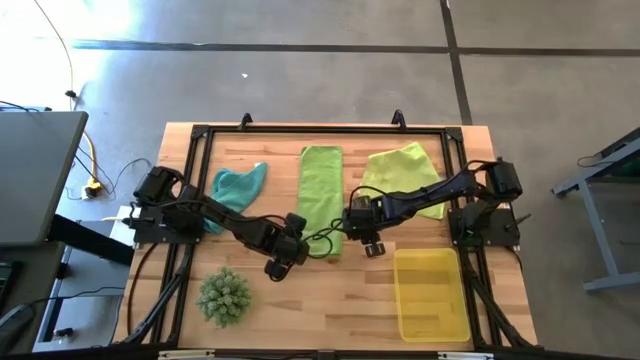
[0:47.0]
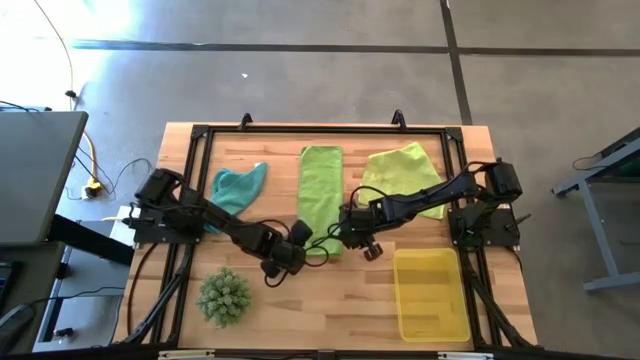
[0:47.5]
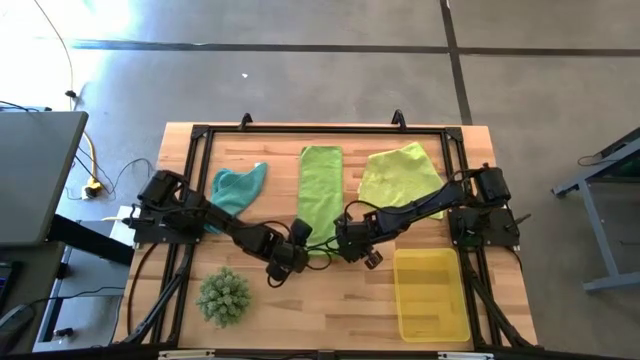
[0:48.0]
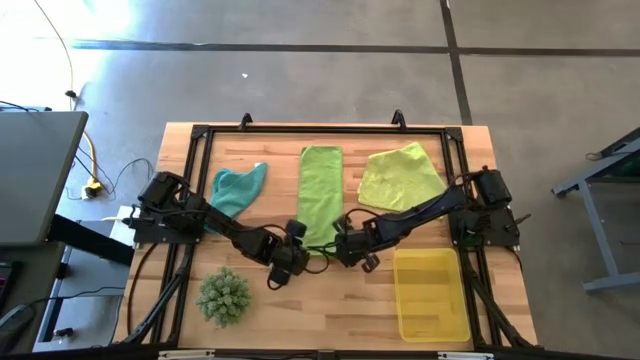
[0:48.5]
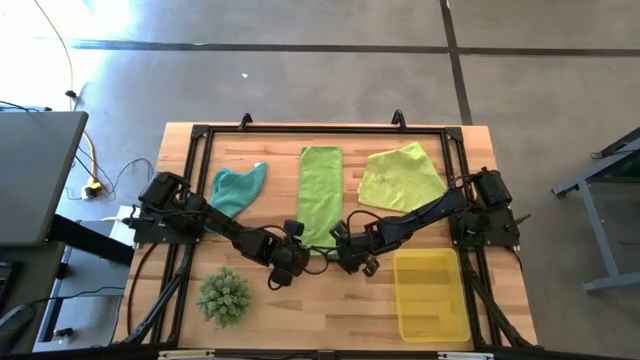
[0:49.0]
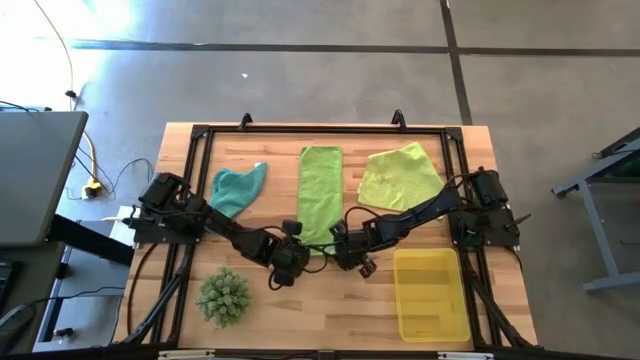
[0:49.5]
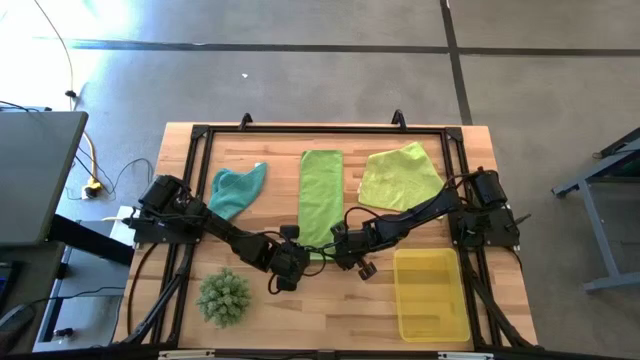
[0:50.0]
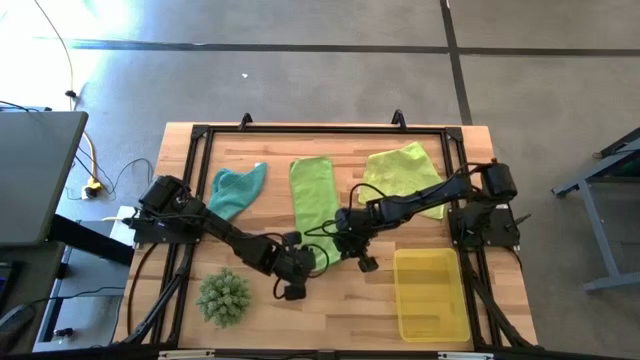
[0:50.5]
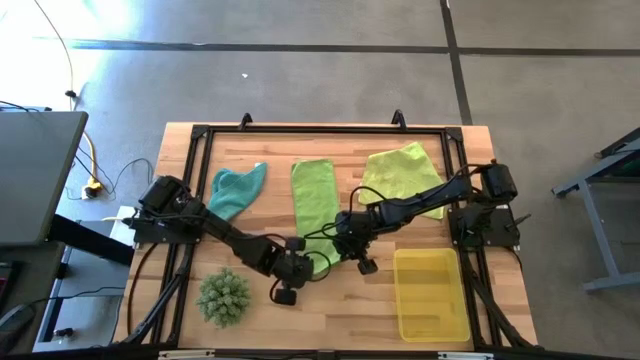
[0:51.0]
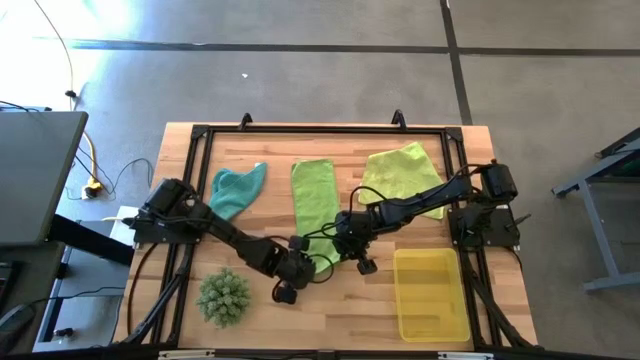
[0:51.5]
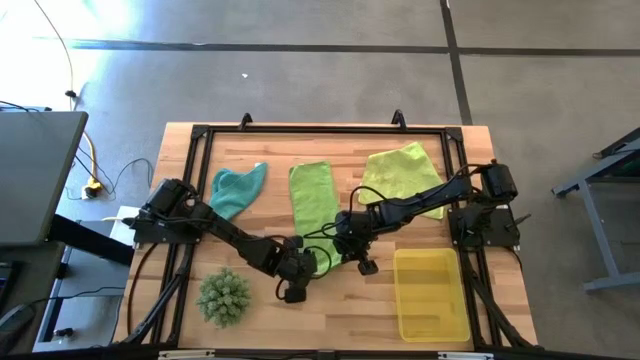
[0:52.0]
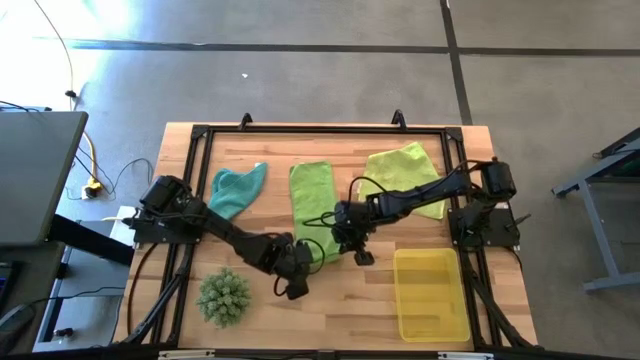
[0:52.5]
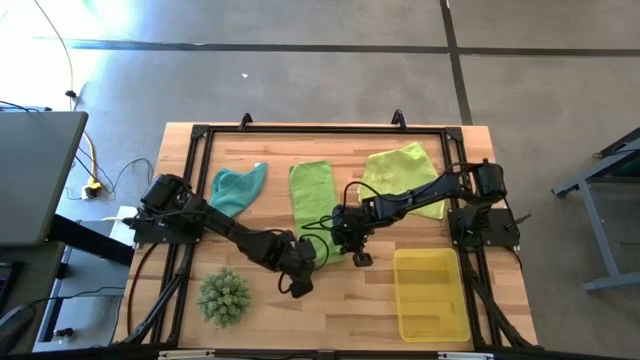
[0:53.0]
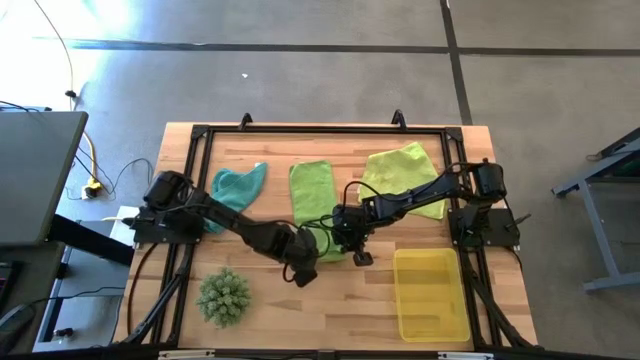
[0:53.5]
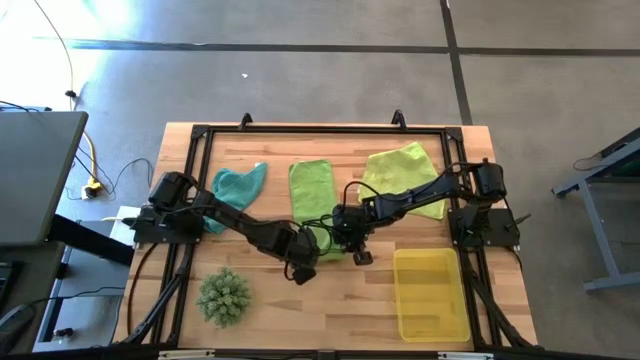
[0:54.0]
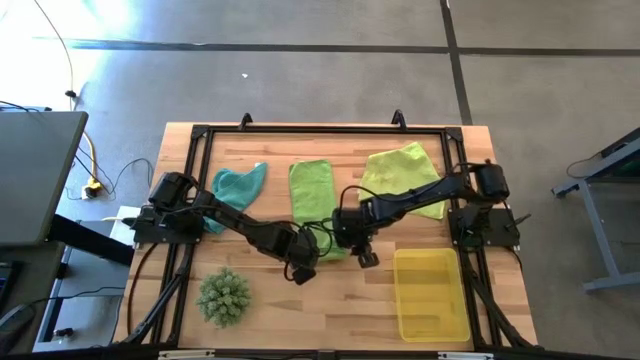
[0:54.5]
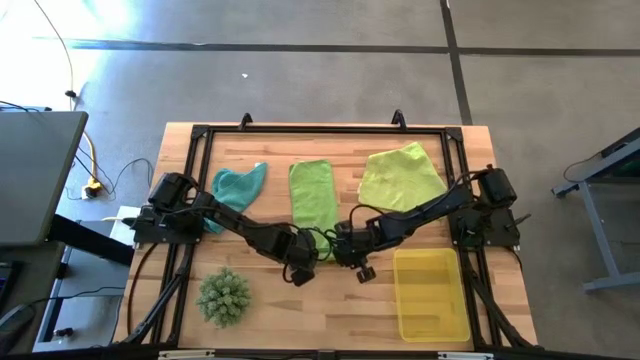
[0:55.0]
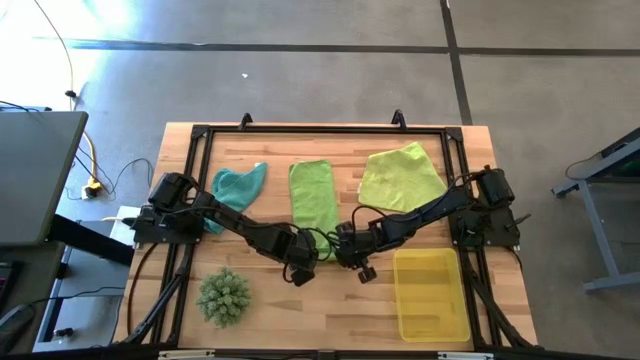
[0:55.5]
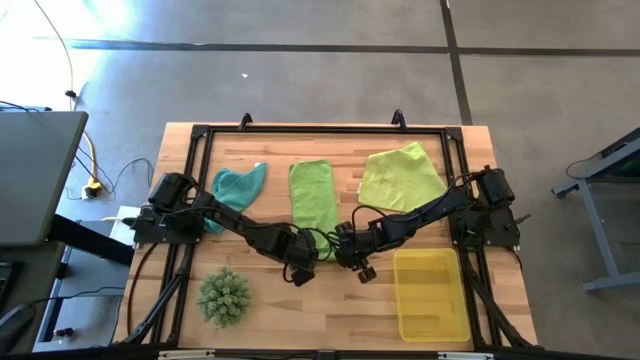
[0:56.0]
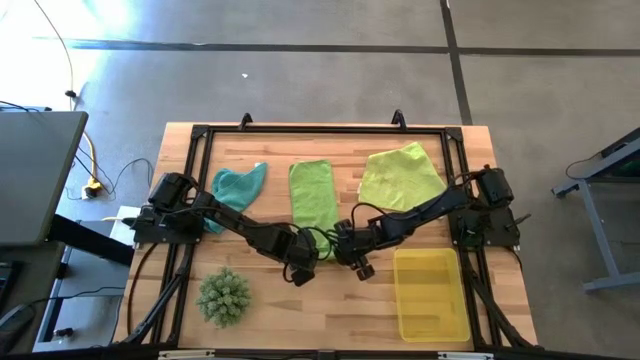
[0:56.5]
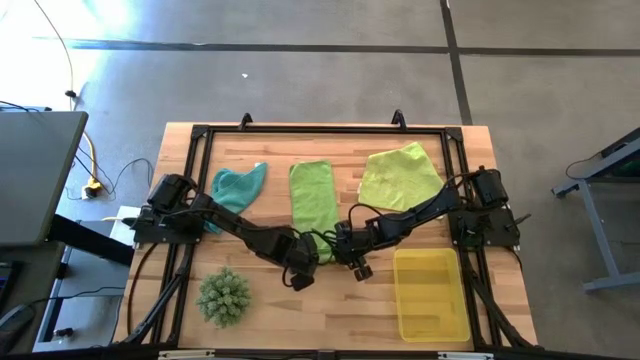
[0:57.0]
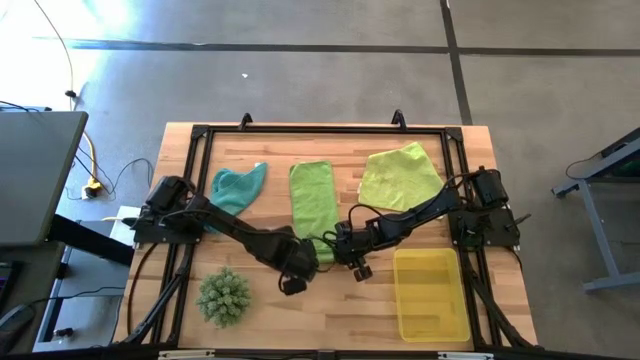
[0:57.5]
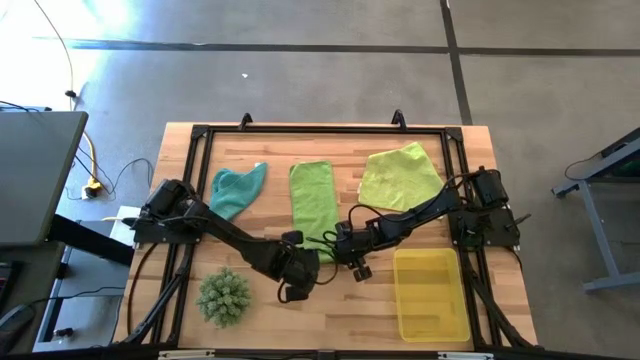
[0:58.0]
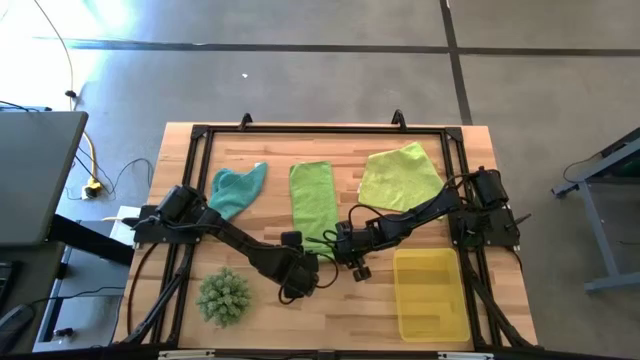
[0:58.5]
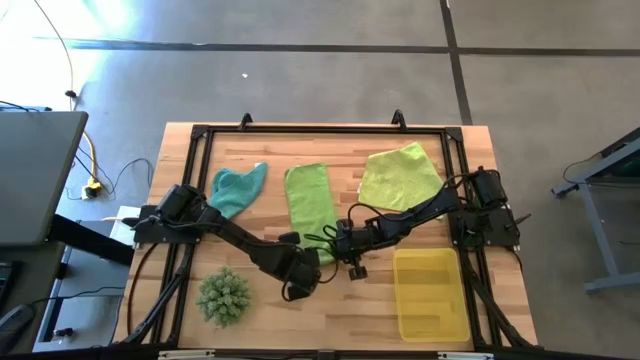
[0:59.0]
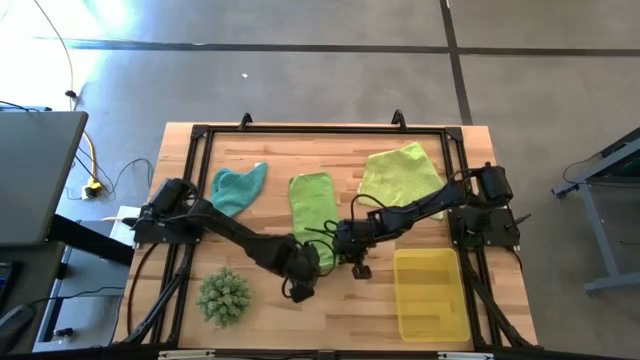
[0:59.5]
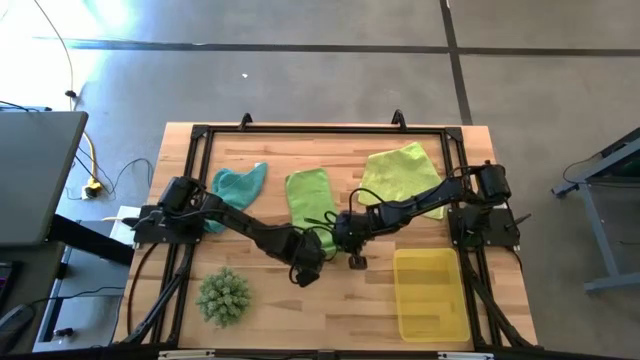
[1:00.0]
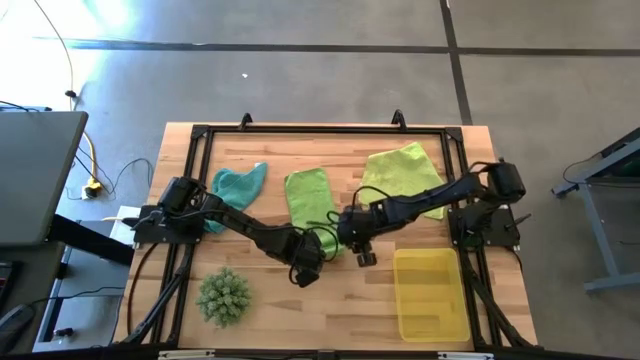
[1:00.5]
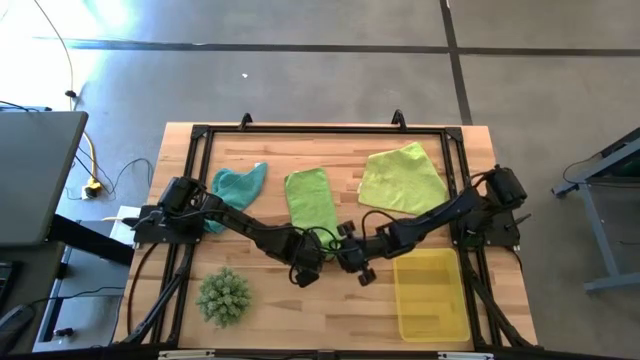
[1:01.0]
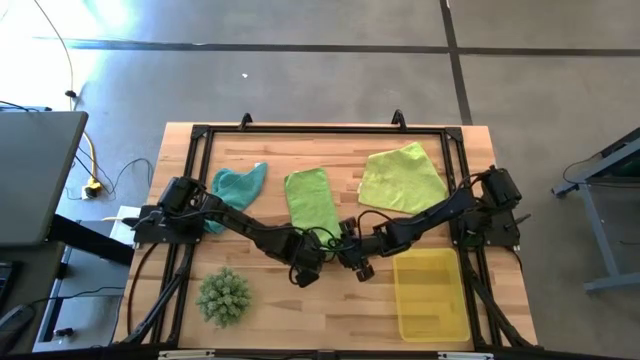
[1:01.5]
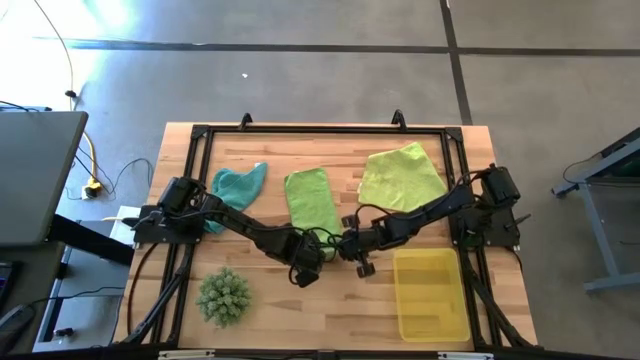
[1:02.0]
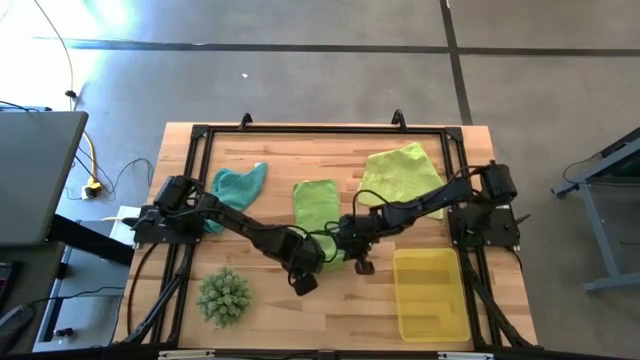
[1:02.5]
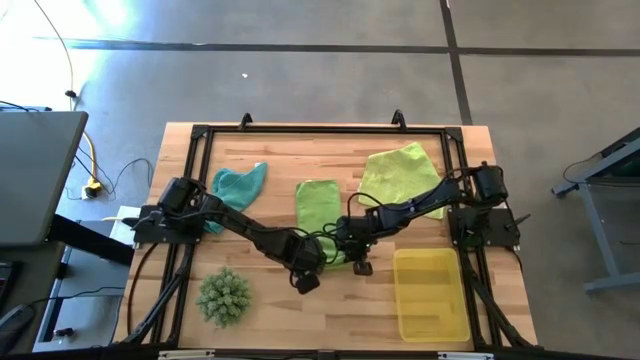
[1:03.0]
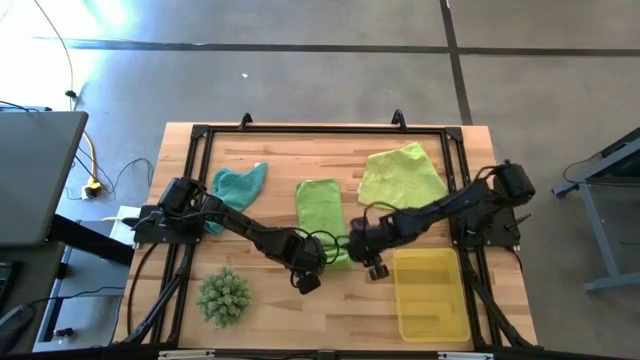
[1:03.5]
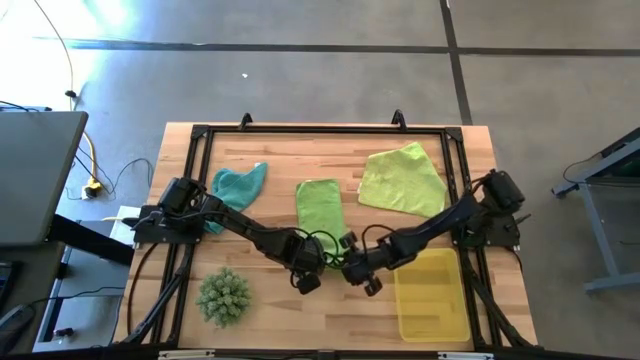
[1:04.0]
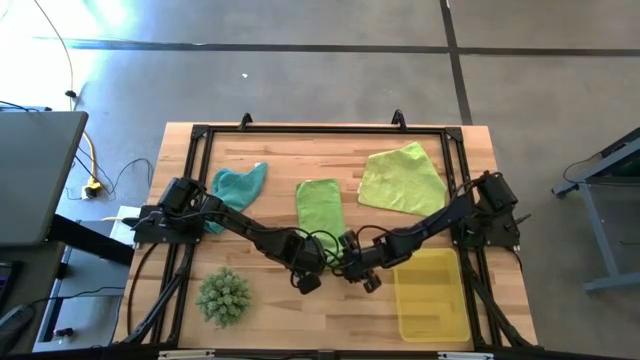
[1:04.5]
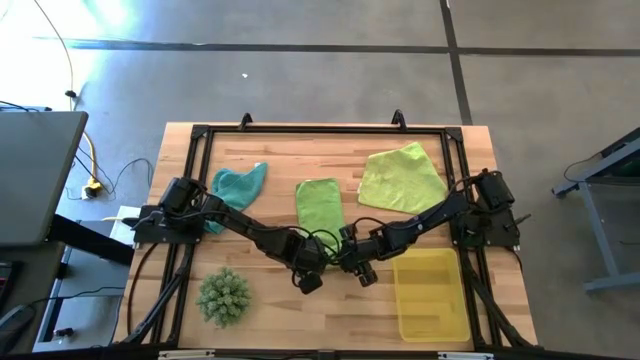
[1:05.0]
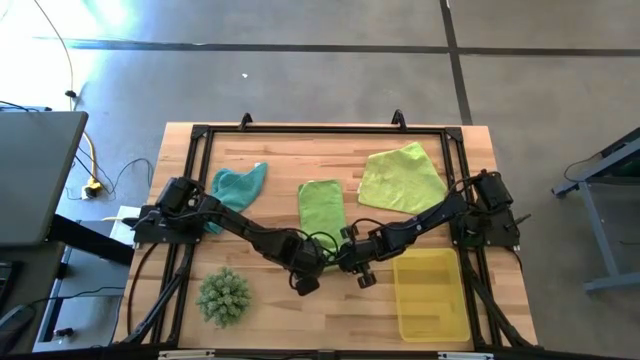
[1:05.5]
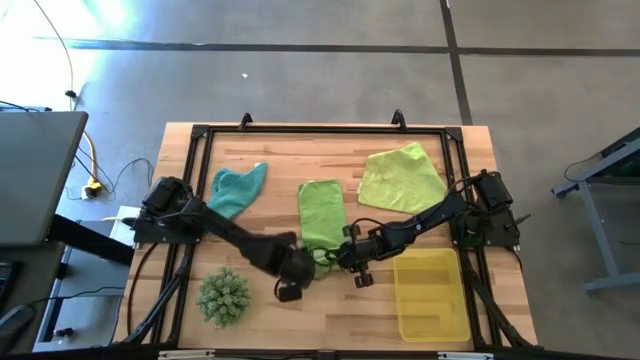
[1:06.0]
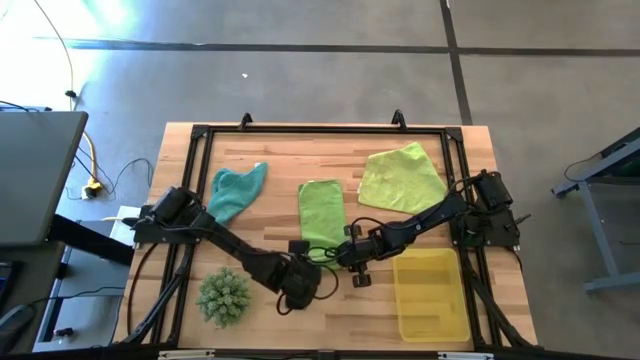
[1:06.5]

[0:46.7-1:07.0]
Task: Roll microfiber towels into tight, uniform cylinder then place into a basket
Roll the green microfiber cloth
